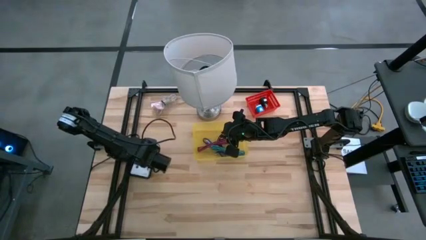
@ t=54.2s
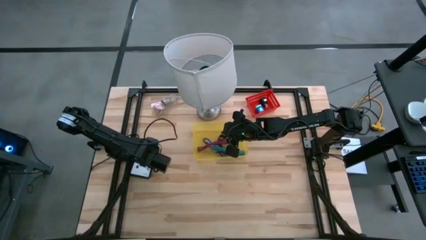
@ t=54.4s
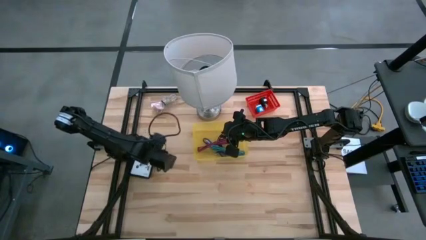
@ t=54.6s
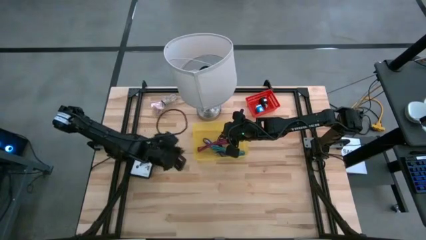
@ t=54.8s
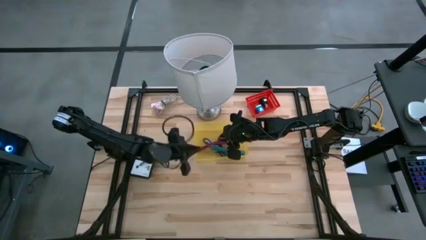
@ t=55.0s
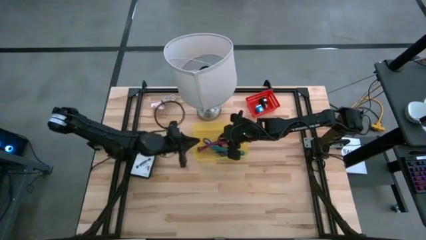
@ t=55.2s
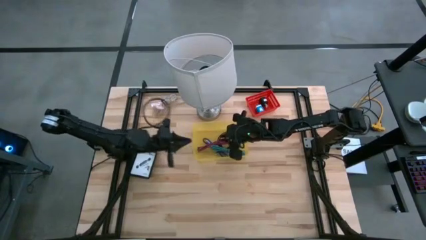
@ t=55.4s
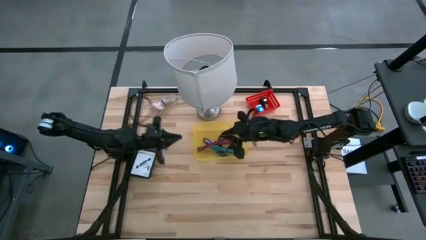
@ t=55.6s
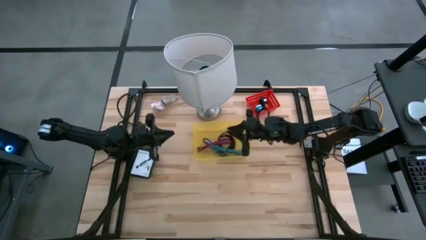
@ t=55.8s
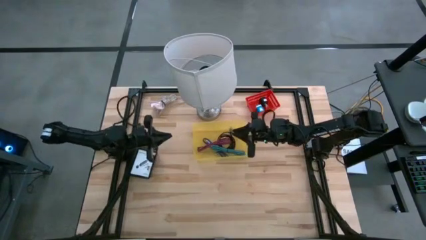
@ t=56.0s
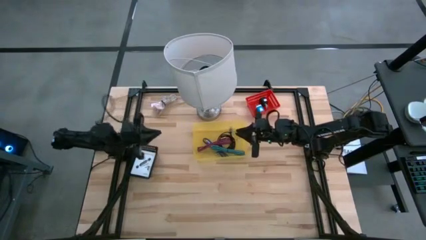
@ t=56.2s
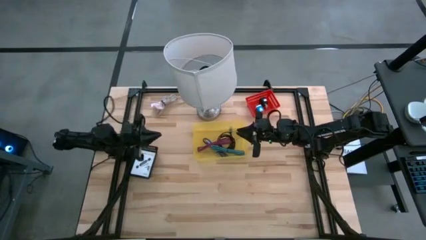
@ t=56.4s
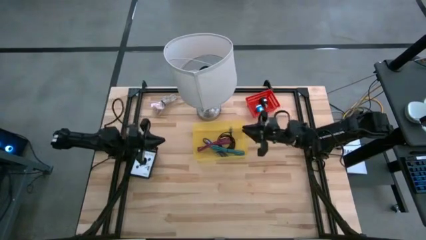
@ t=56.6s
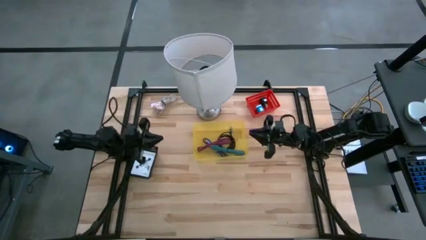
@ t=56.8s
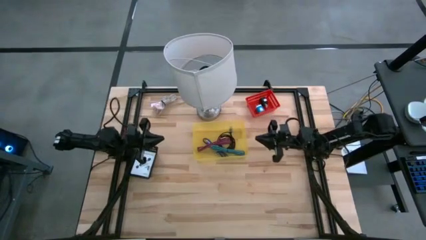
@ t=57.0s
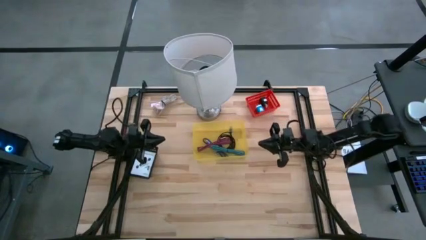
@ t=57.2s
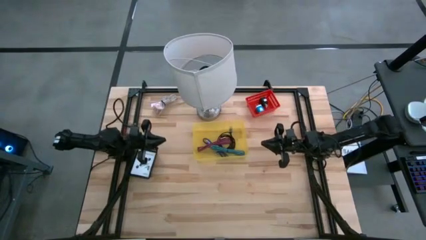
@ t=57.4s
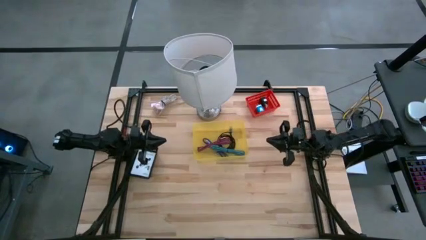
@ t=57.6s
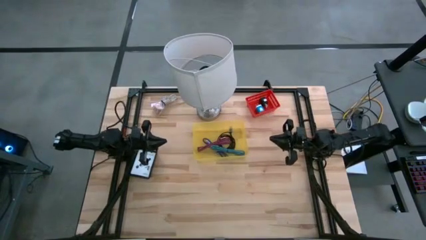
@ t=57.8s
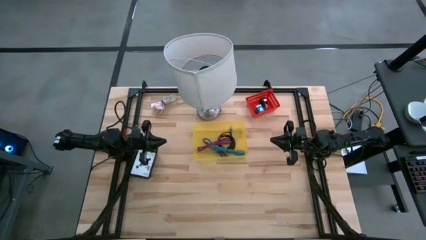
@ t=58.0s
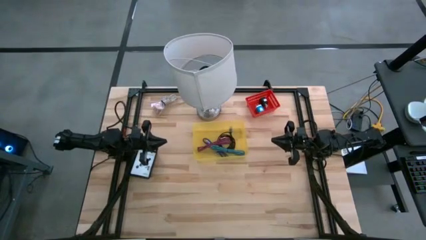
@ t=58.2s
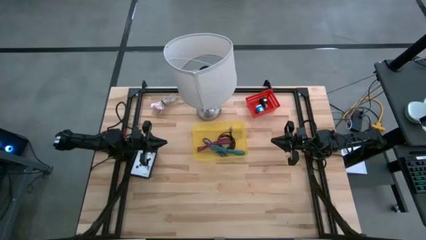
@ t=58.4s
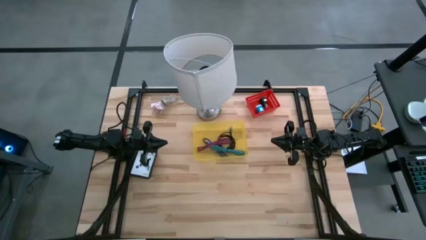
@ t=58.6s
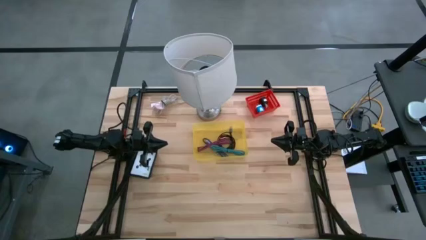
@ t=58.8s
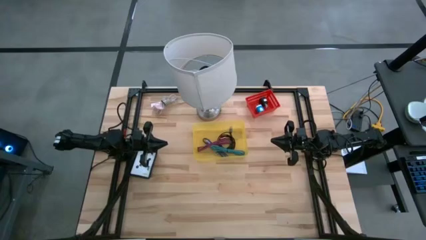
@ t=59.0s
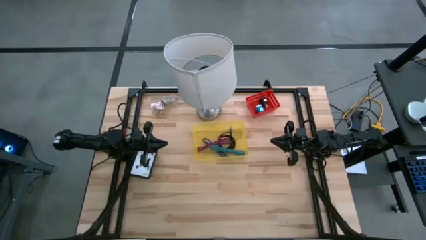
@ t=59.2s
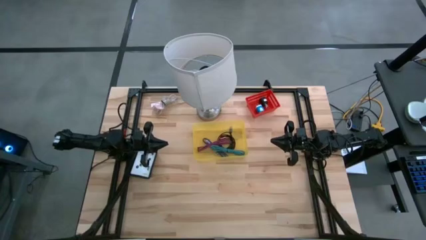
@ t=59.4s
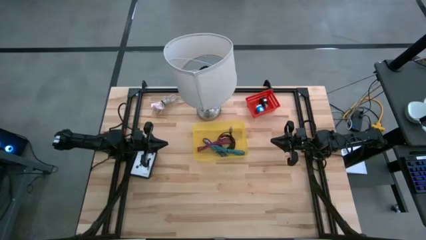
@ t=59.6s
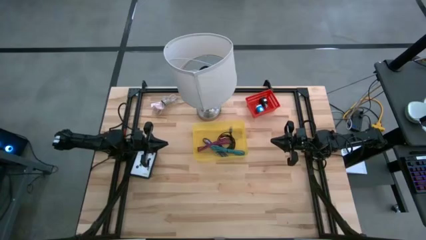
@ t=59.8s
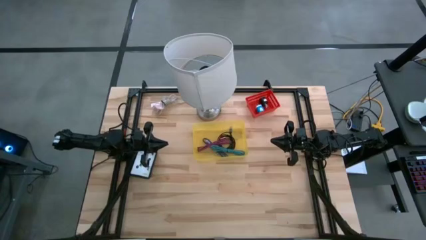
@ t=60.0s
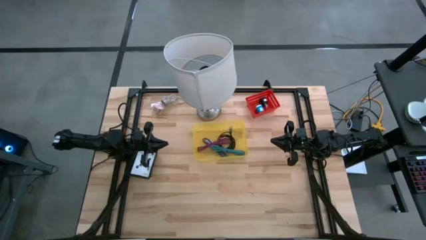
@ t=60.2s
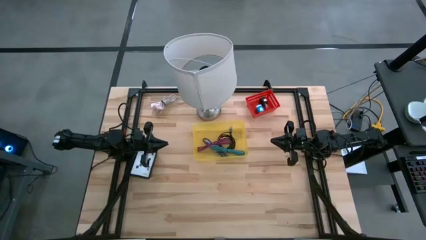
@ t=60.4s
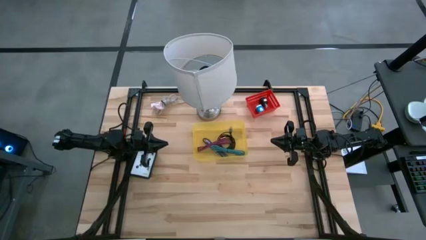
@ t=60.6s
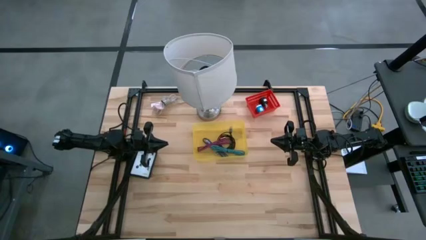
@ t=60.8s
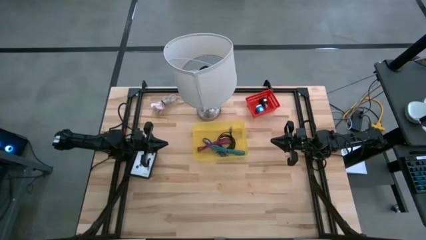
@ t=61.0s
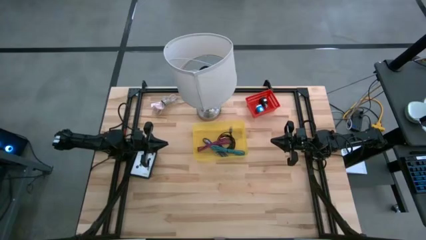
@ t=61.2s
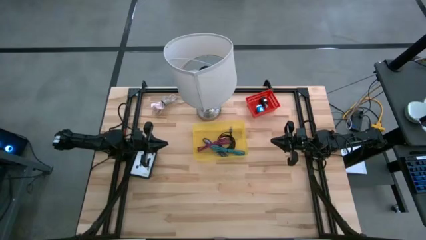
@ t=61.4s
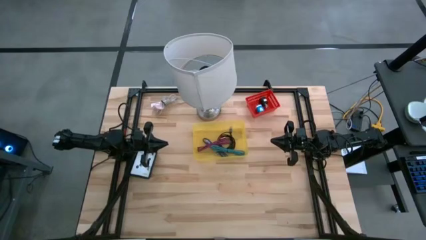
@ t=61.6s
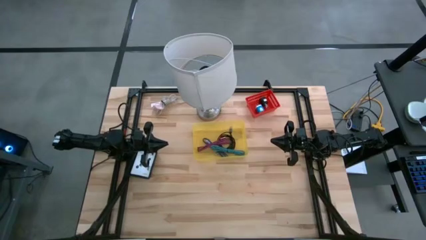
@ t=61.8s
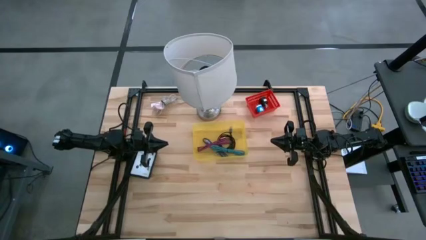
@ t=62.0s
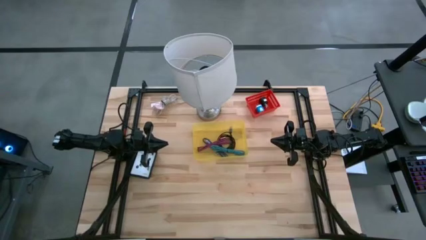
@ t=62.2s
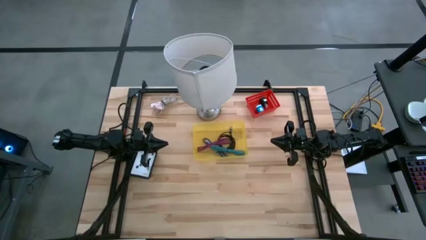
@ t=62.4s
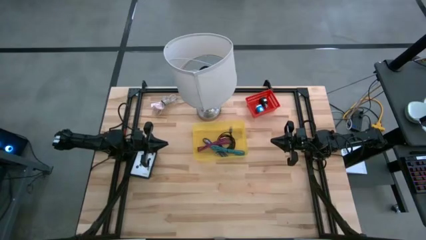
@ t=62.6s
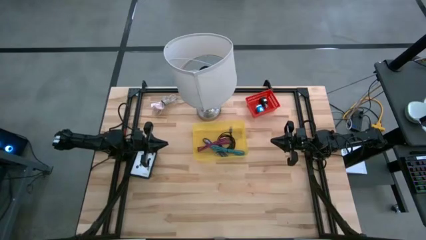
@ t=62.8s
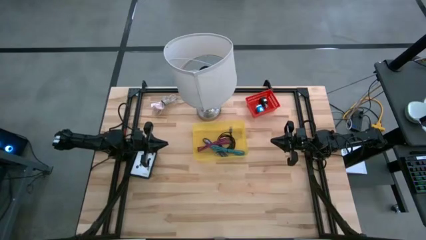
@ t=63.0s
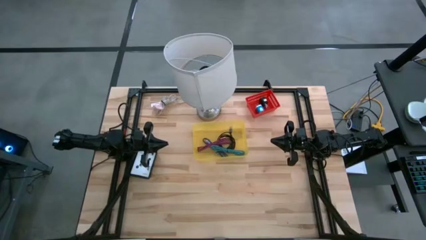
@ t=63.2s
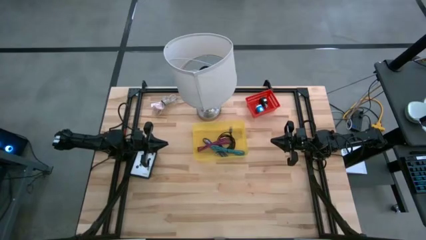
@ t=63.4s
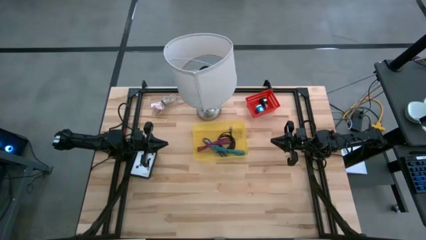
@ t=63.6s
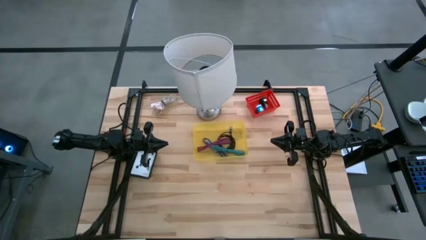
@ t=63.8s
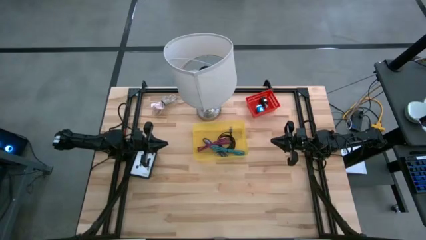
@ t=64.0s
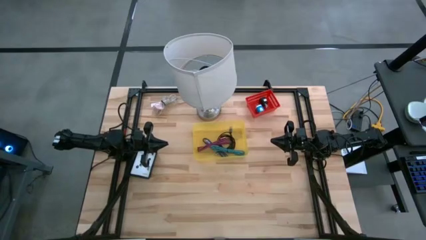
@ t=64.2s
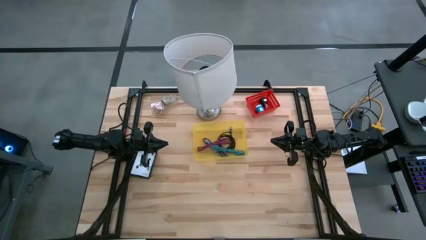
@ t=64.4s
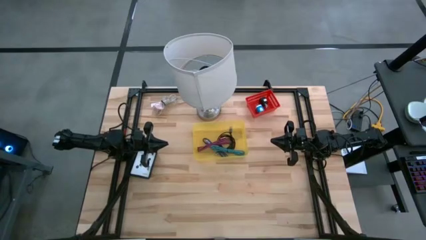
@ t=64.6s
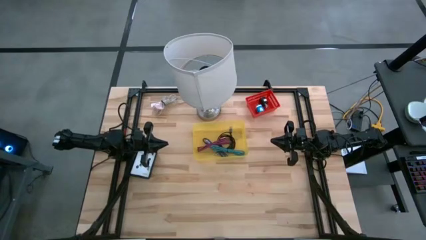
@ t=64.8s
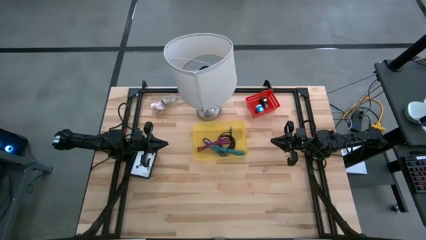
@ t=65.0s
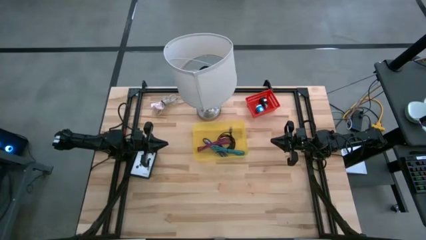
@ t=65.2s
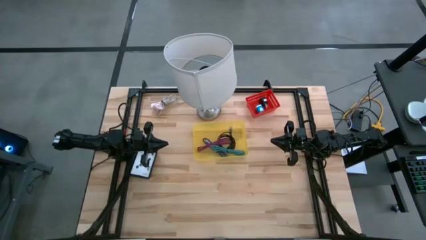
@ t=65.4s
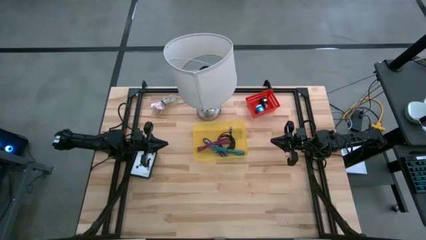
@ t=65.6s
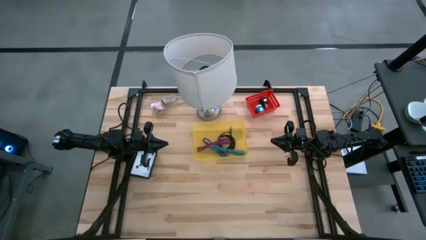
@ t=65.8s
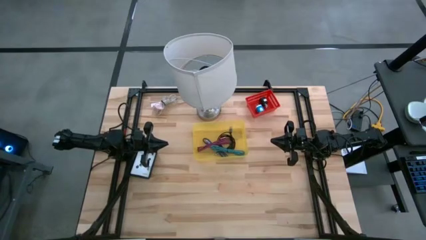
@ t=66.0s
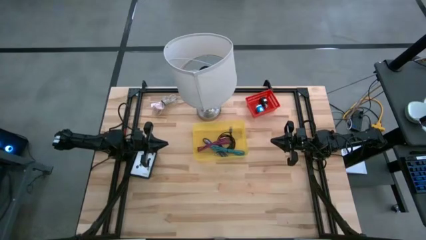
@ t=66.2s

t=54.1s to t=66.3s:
Task: Pick and place items into bin
Return to Home Position

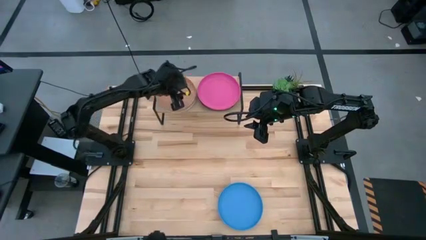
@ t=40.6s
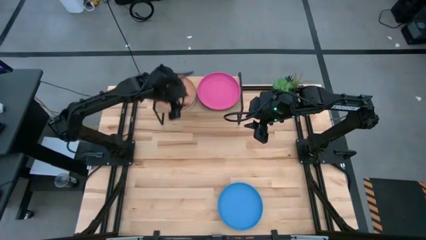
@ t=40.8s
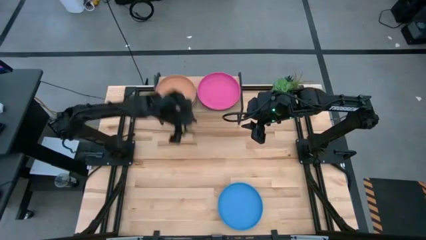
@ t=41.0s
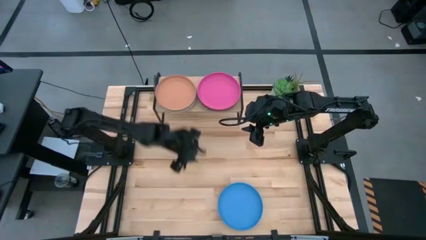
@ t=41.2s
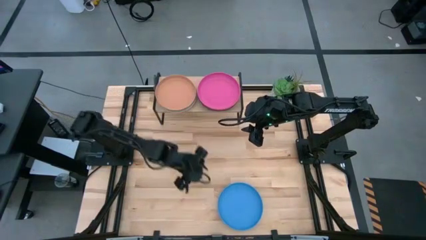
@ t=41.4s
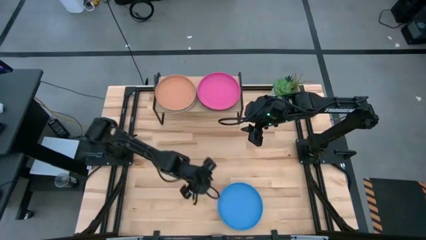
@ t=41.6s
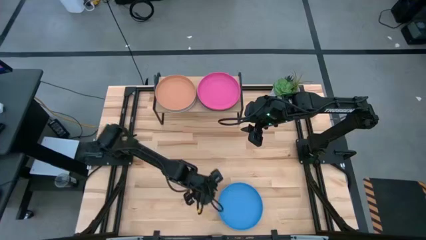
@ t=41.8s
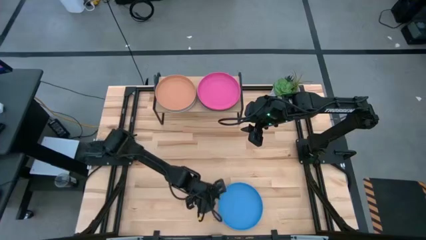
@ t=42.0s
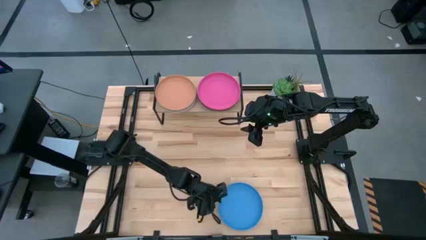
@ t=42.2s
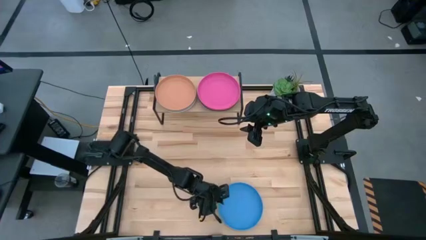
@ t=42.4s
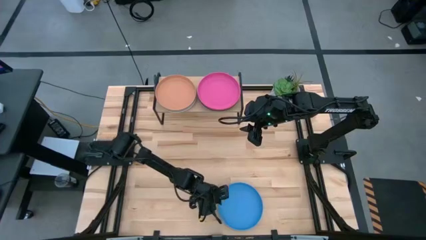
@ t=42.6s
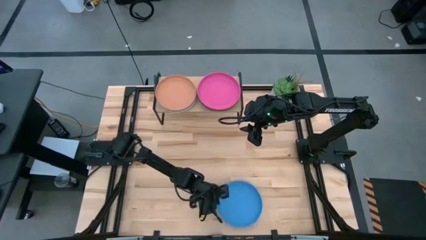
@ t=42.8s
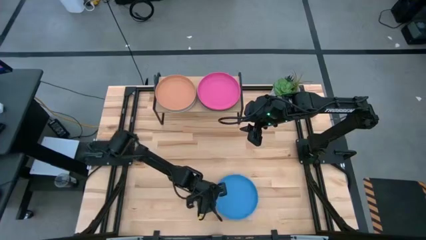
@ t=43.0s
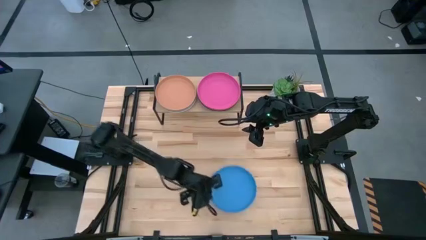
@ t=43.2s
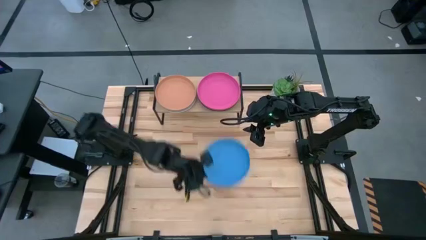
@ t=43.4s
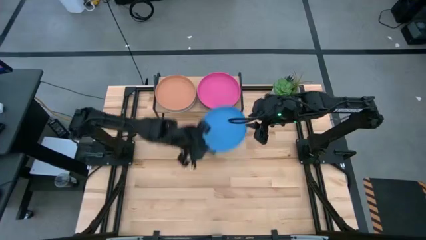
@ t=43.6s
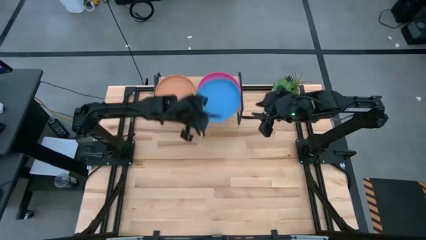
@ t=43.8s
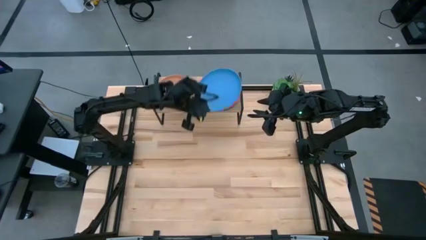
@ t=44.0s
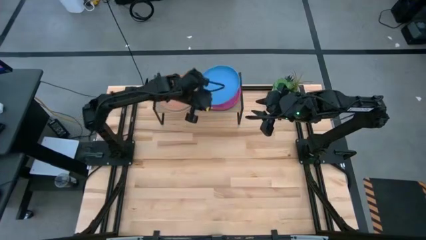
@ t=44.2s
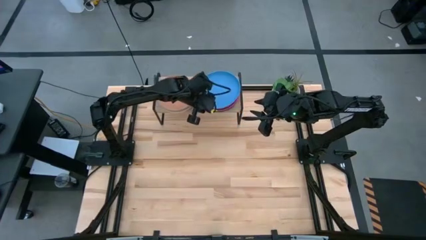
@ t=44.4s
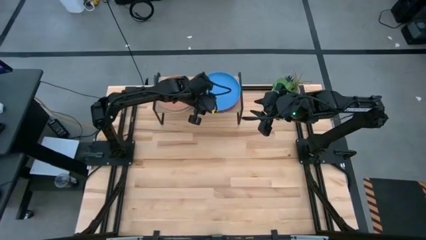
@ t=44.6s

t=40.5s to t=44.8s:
Task: Place and stack plates onto a shelf
Stack the blue plate on top of the pink plate on the shelf
